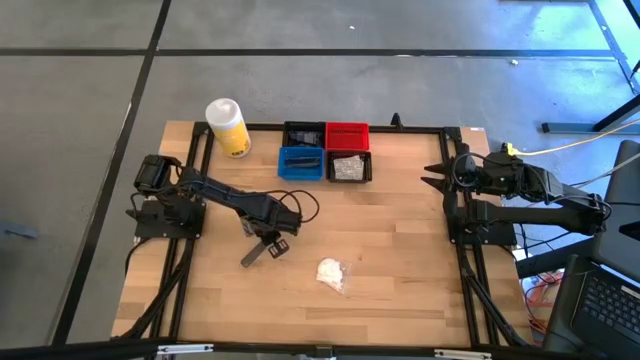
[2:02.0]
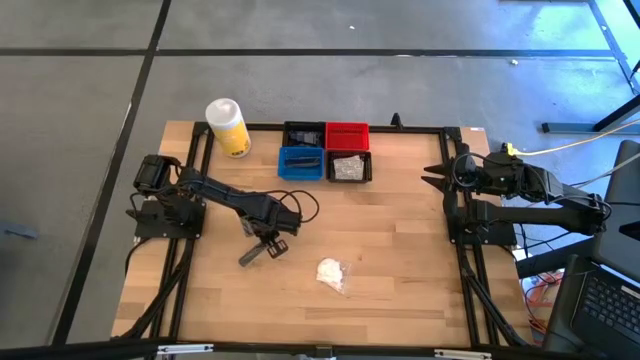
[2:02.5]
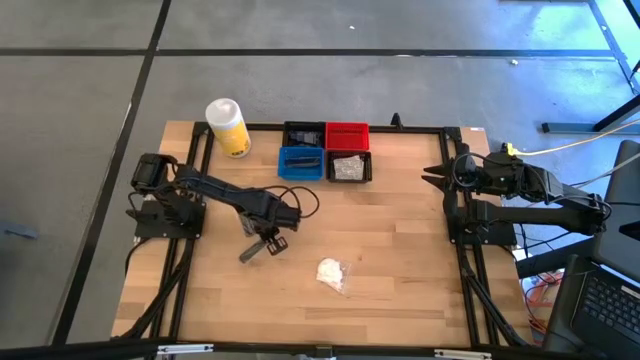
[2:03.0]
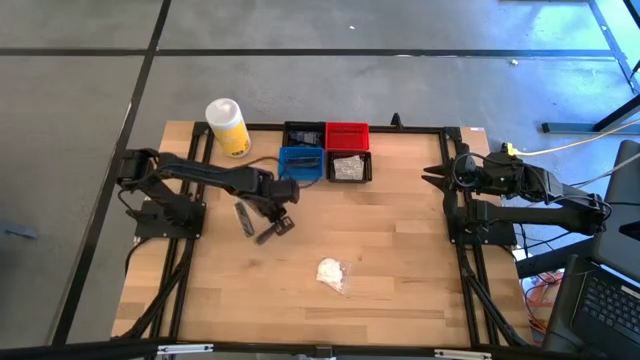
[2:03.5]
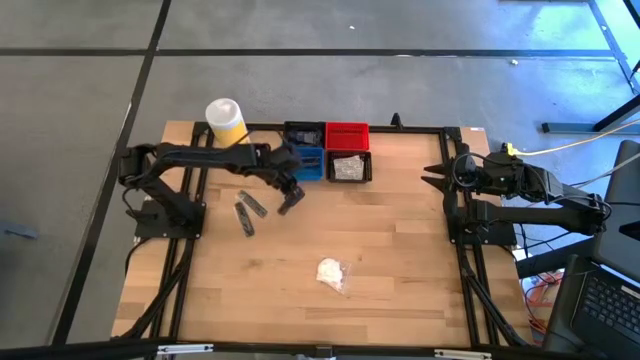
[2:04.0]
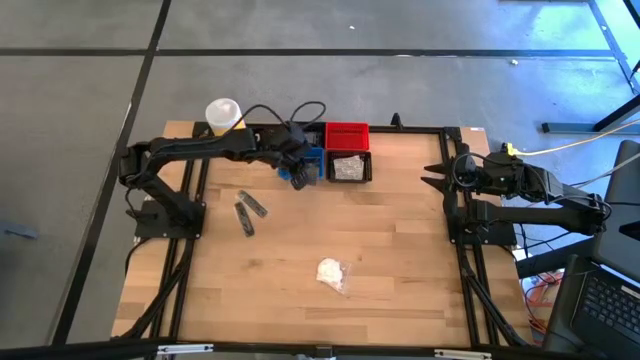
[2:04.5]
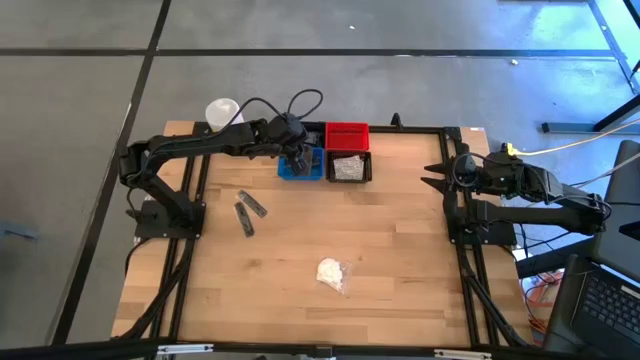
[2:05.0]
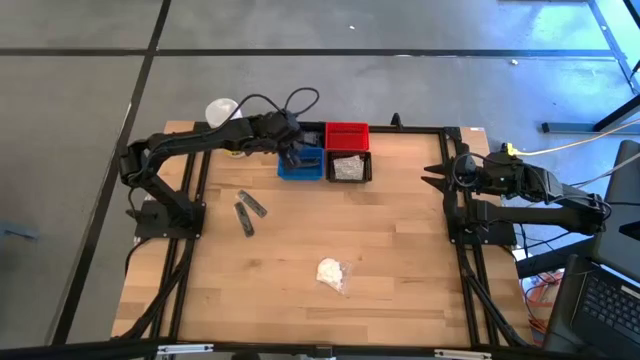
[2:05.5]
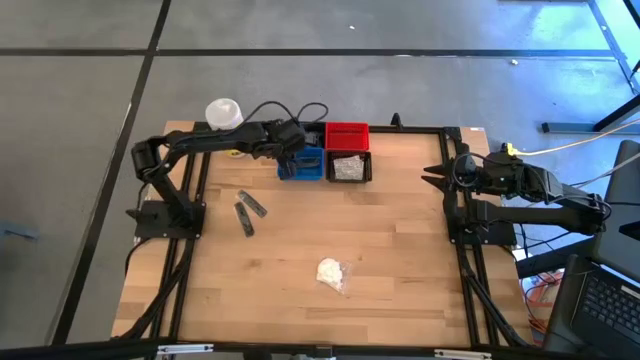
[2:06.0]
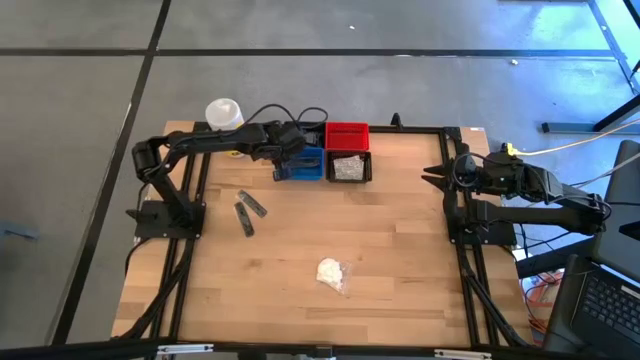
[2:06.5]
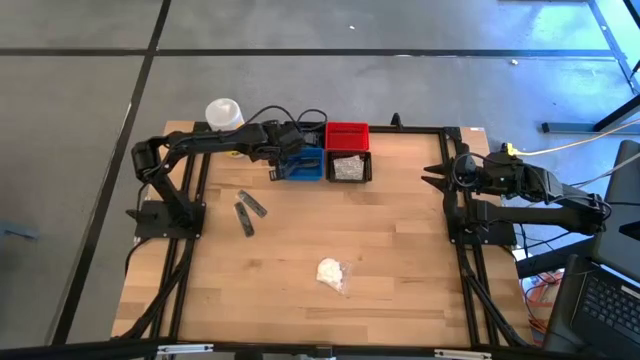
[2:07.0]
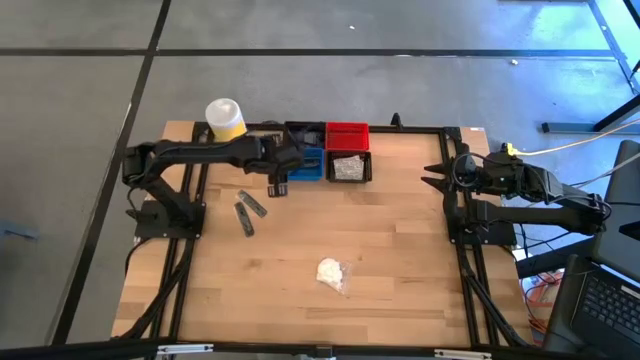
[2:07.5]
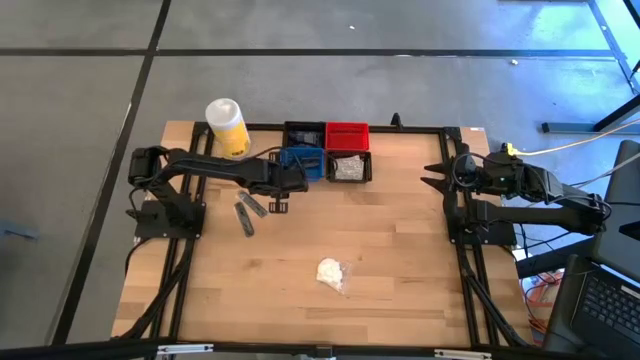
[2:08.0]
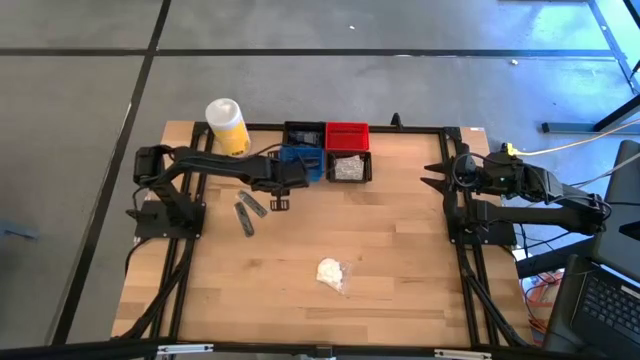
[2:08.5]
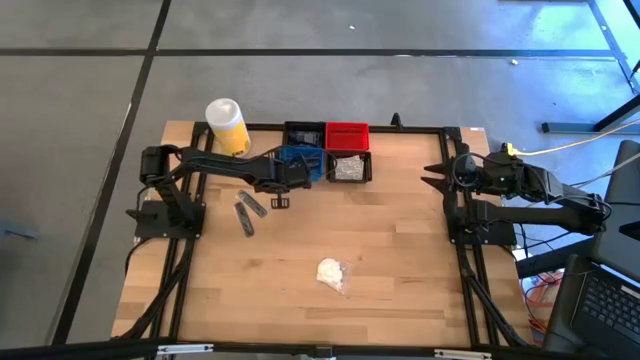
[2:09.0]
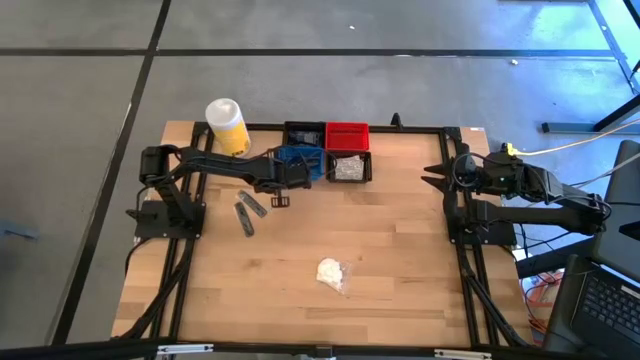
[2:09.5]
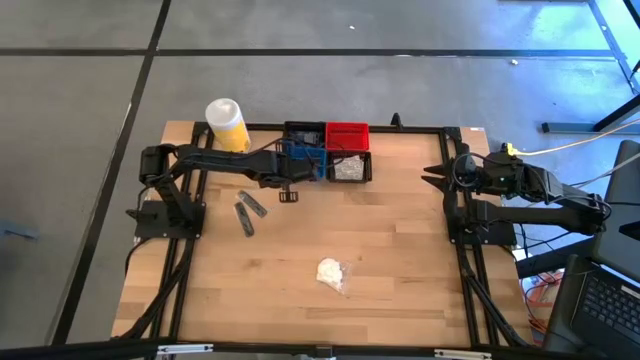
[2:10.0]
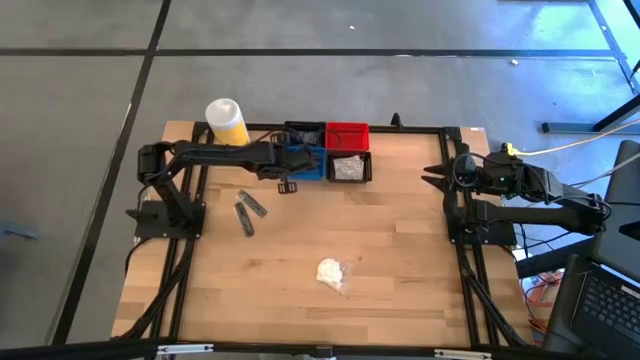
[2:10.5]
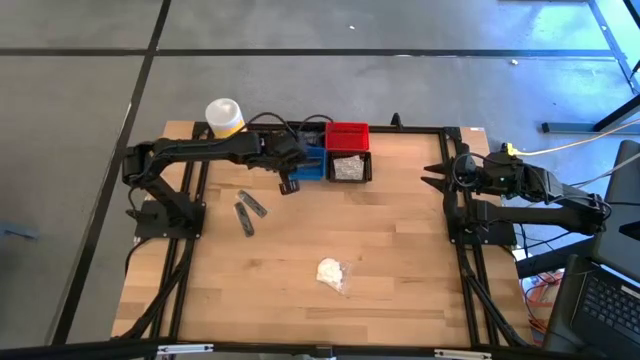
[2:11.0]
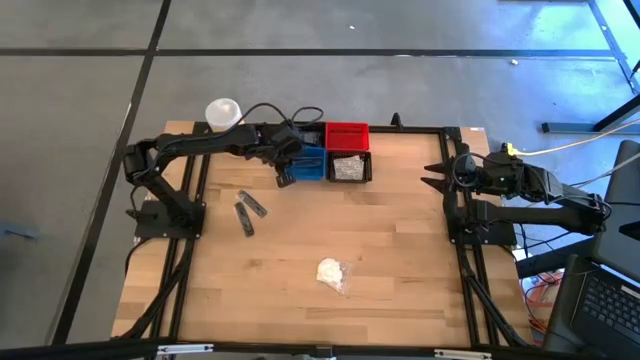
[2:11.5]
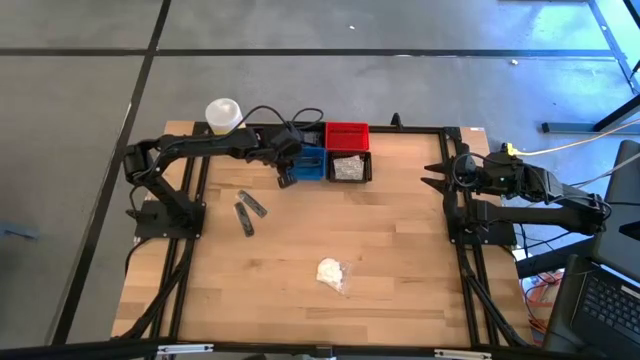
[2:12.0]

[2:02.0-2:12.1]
Task: Pick & Place Travel size toiletries
Put the bottom comb into the blue bin

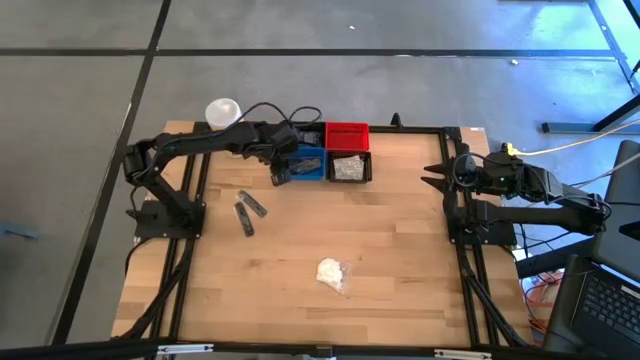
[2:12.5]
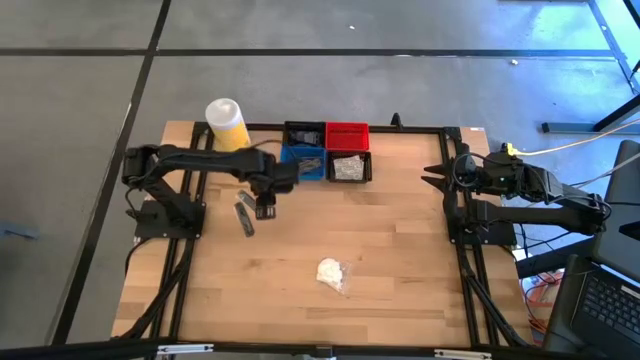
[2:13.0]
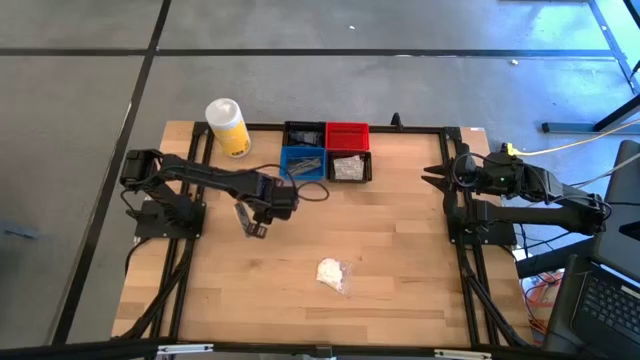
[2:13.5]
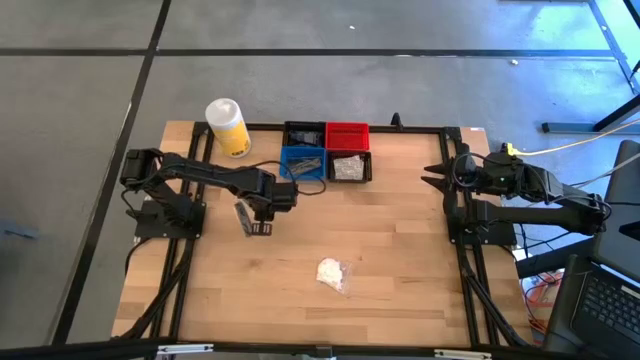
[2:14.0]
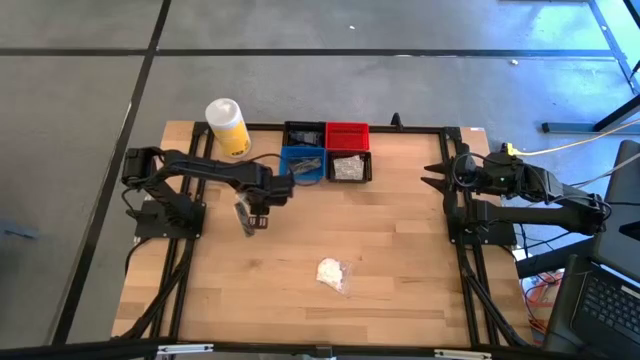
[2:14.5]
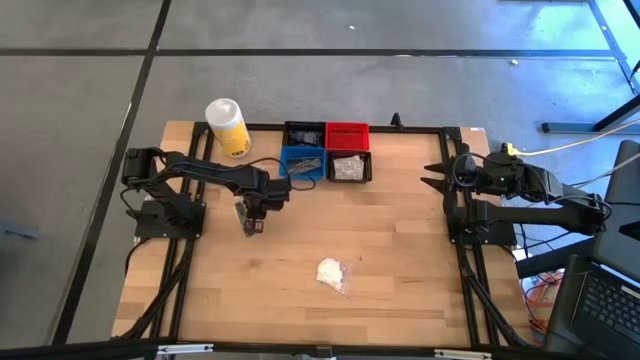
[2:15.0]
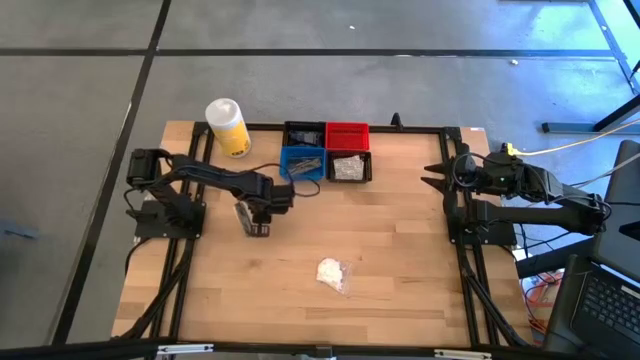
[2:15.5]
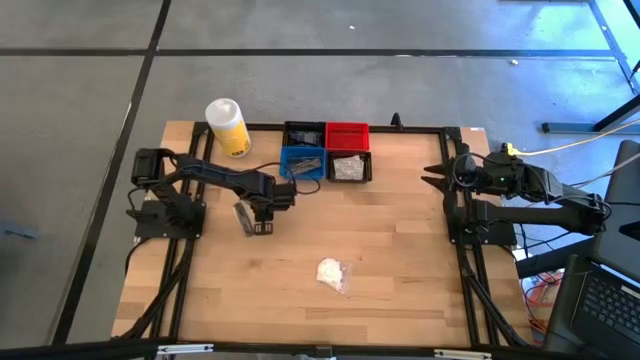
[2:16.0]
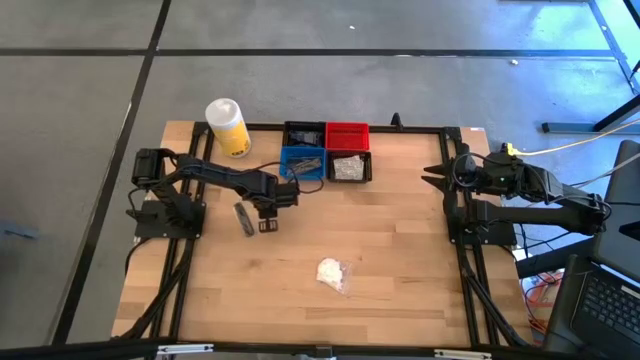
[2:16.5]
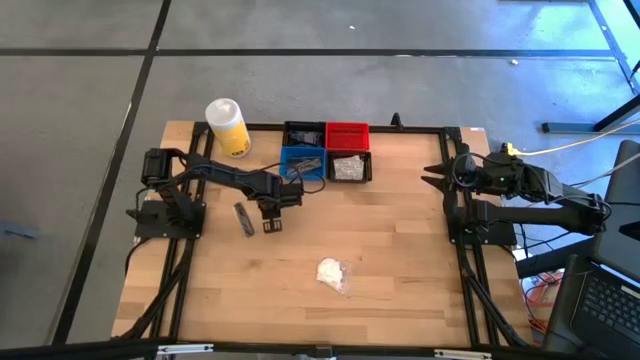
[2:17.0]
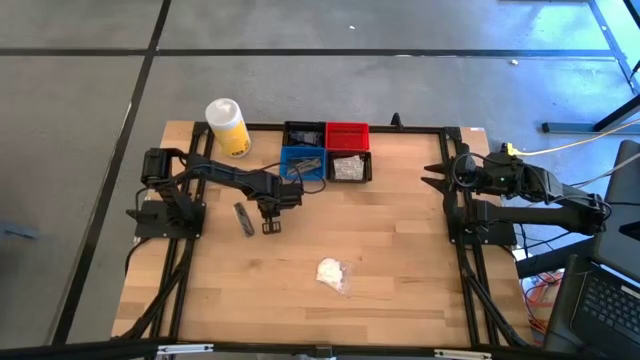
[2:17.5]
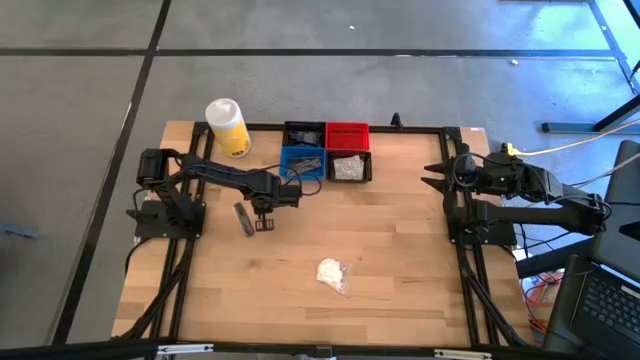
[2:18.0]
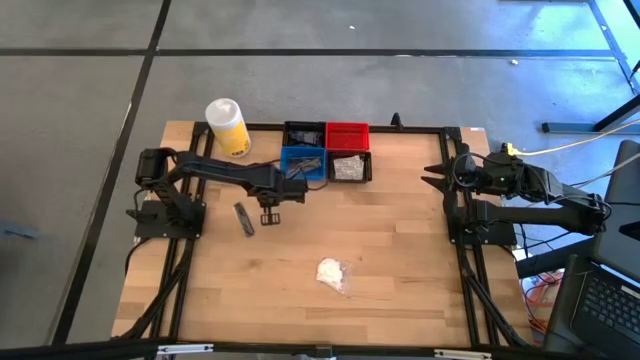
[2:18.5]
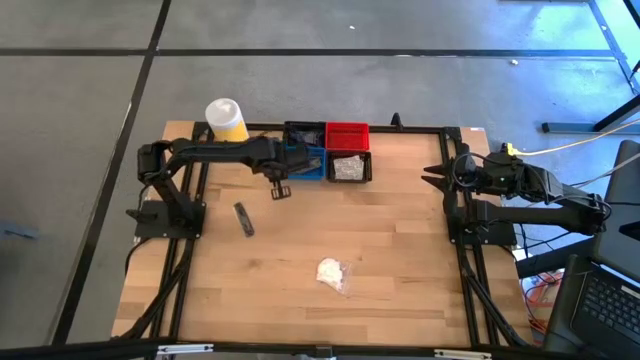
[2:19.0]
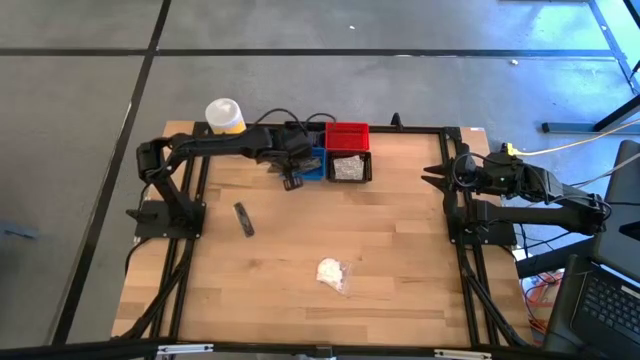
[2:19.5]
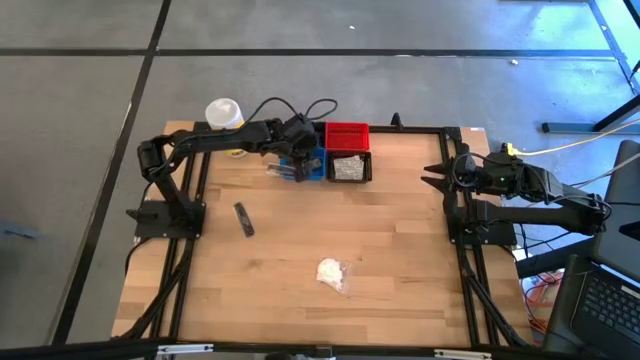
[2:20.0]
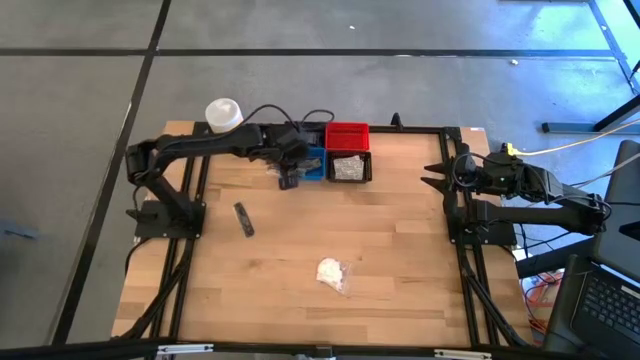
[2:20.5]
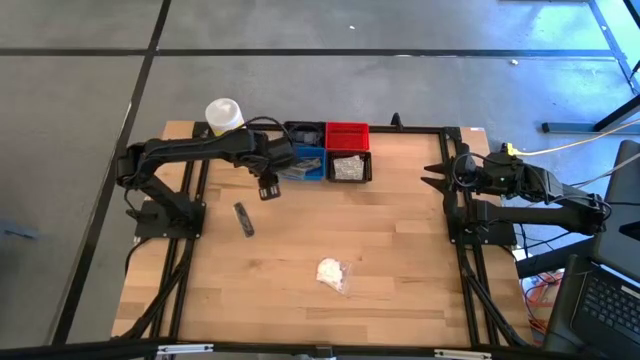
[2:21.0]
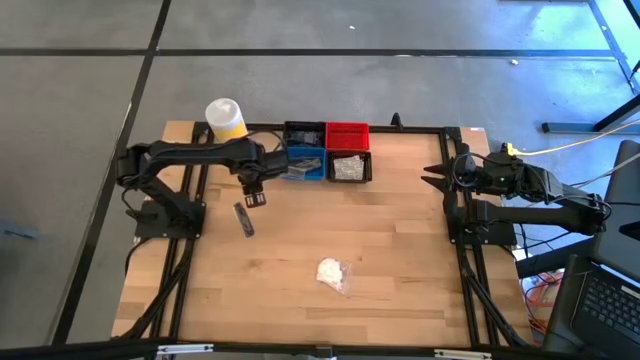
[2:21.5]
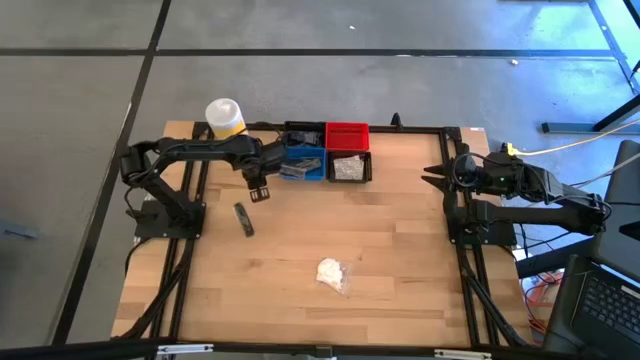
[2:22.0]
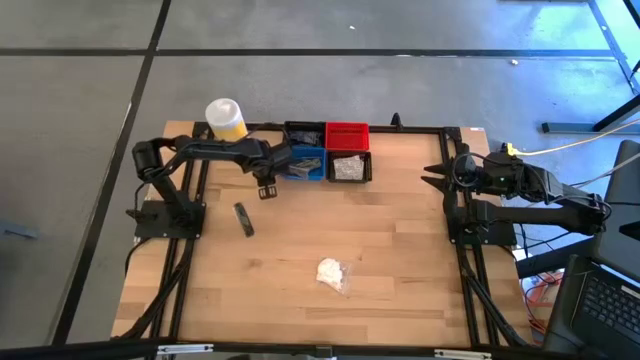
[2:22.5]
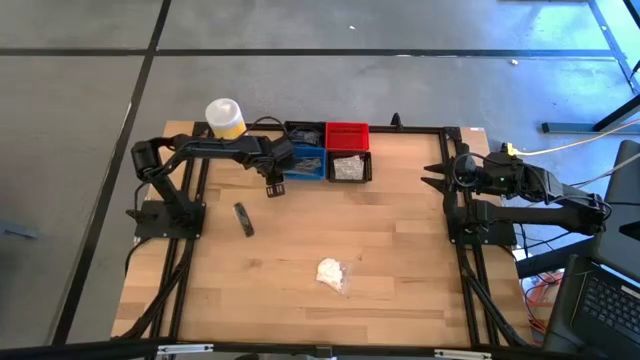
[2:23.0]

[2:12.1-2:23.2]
Put the right comb into the blue bin
